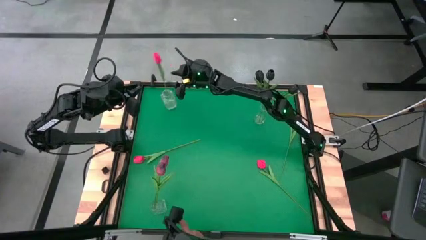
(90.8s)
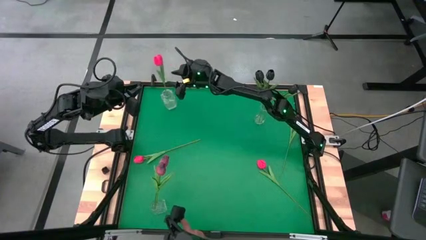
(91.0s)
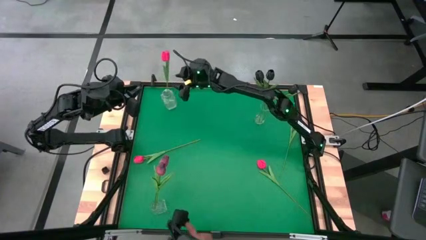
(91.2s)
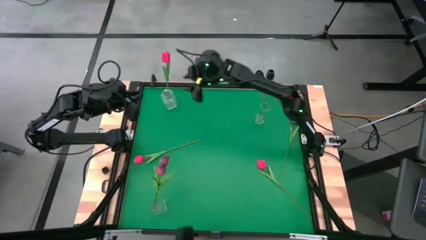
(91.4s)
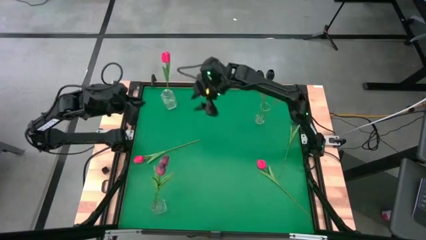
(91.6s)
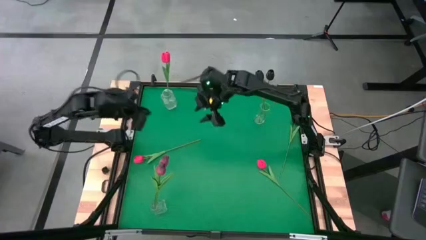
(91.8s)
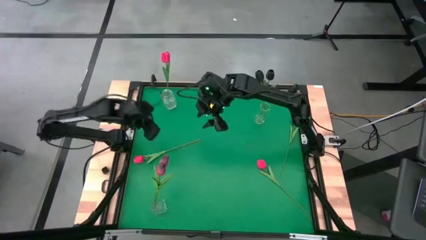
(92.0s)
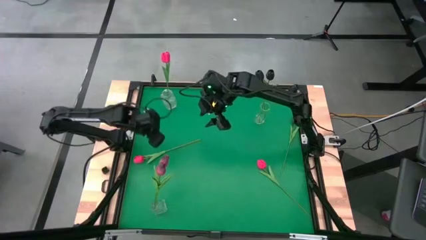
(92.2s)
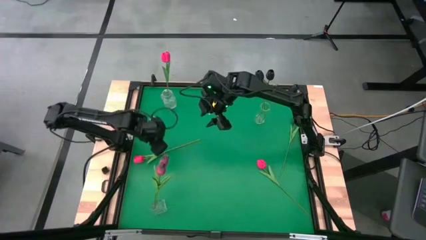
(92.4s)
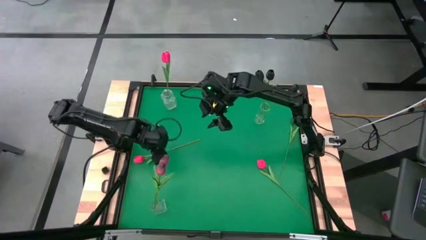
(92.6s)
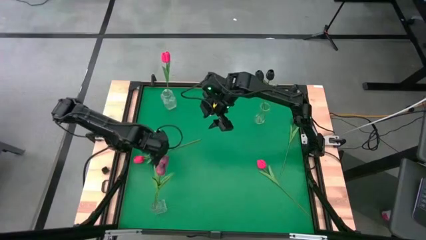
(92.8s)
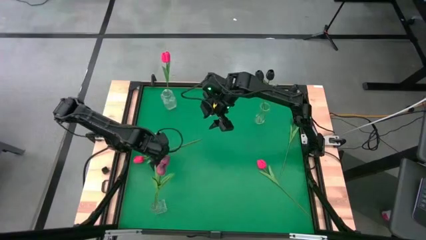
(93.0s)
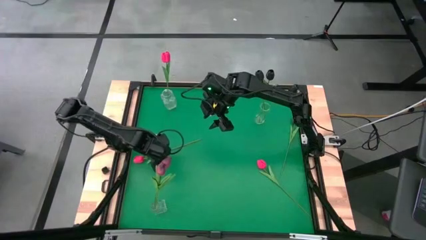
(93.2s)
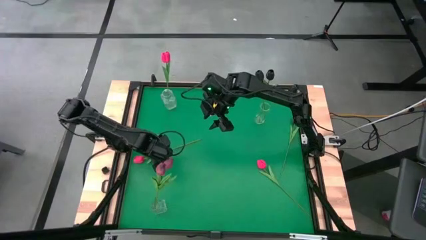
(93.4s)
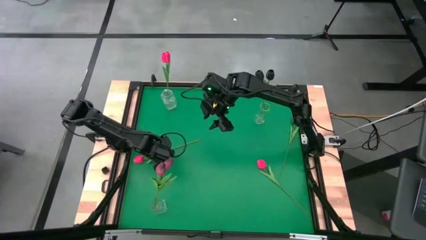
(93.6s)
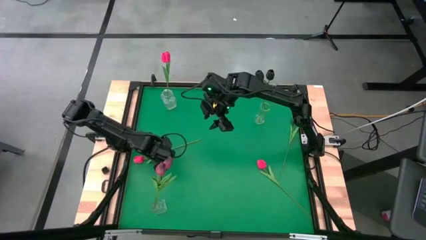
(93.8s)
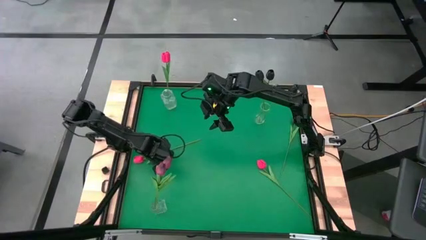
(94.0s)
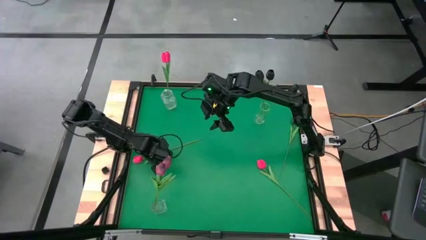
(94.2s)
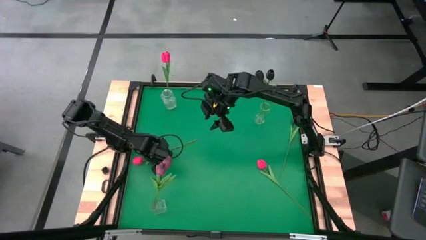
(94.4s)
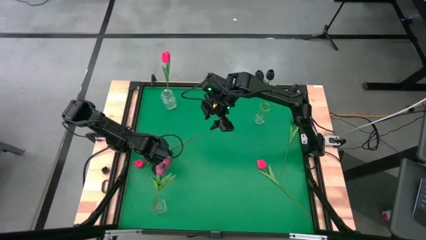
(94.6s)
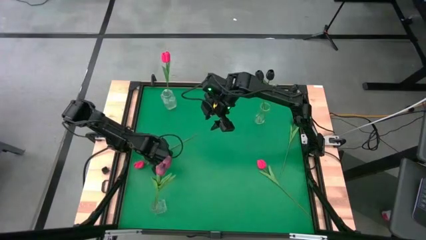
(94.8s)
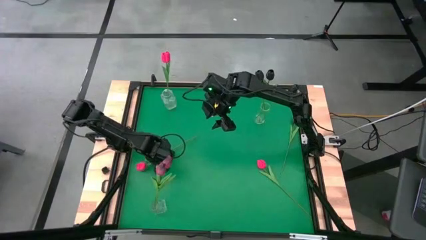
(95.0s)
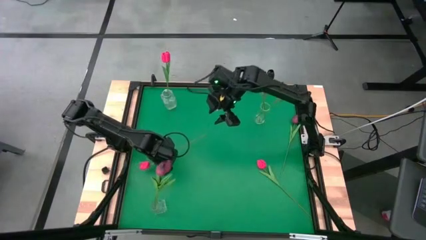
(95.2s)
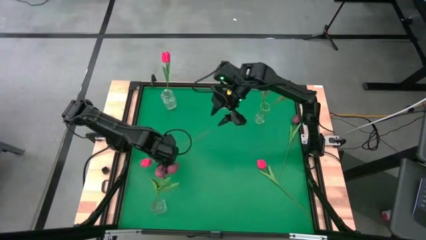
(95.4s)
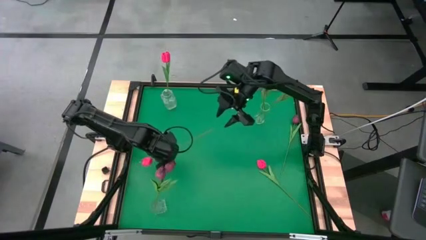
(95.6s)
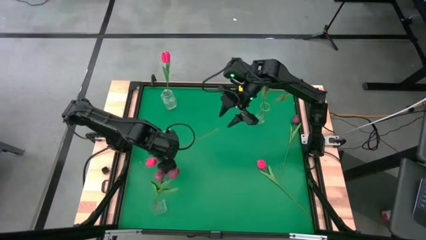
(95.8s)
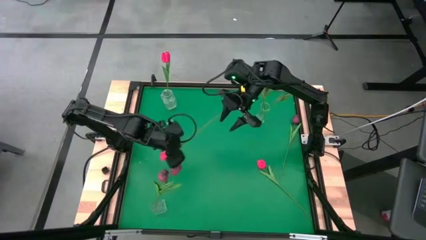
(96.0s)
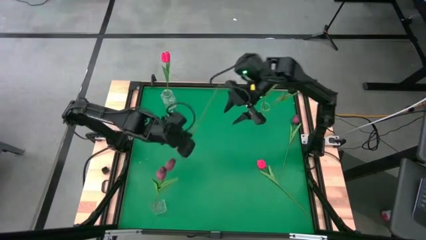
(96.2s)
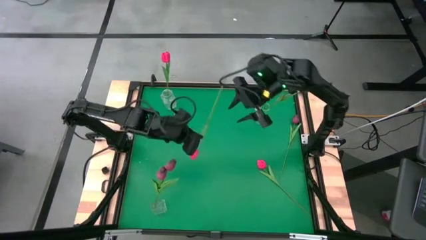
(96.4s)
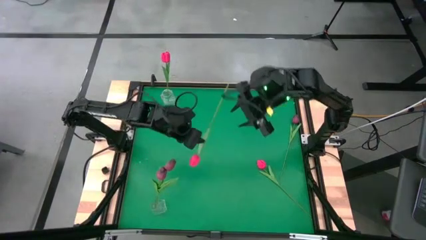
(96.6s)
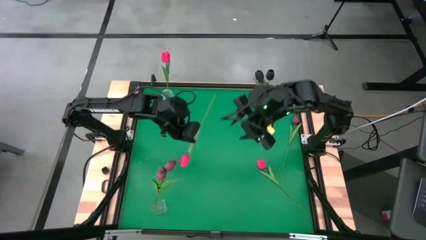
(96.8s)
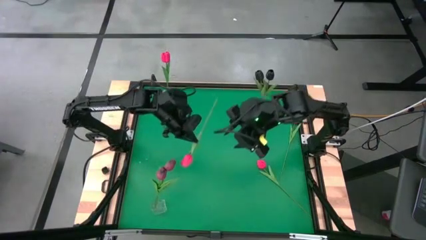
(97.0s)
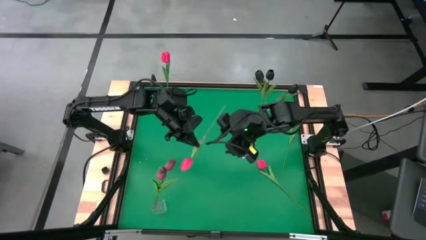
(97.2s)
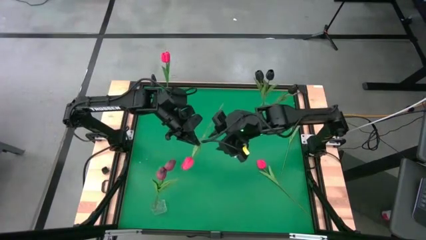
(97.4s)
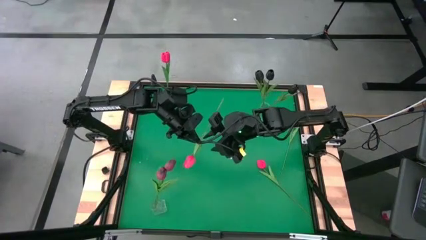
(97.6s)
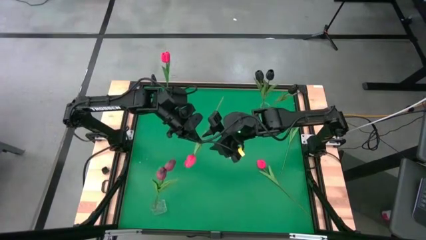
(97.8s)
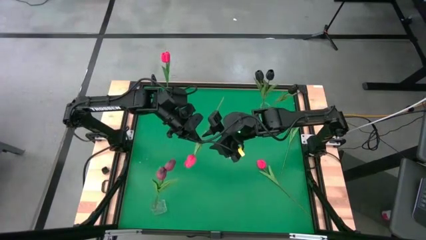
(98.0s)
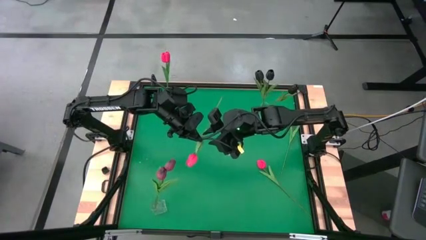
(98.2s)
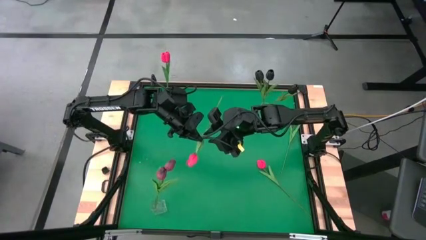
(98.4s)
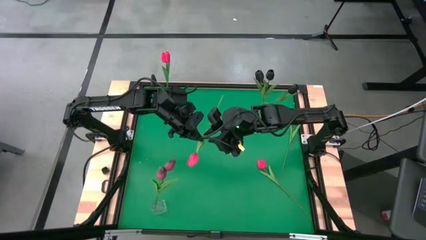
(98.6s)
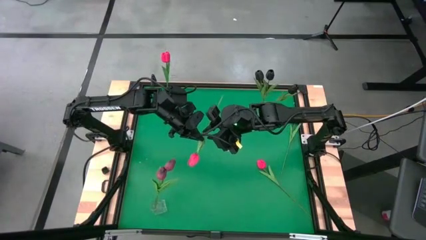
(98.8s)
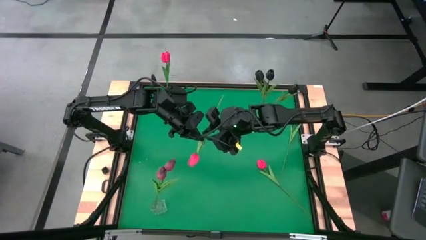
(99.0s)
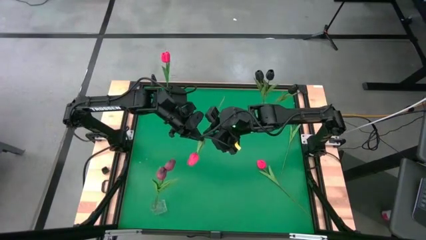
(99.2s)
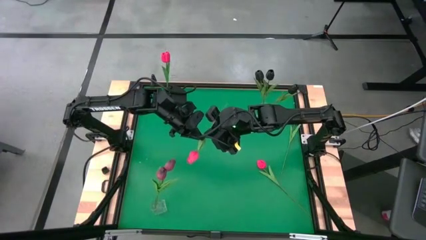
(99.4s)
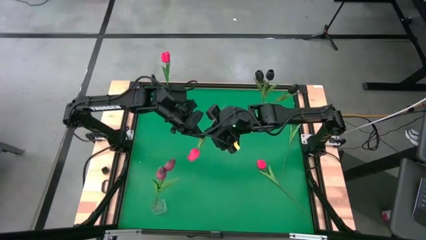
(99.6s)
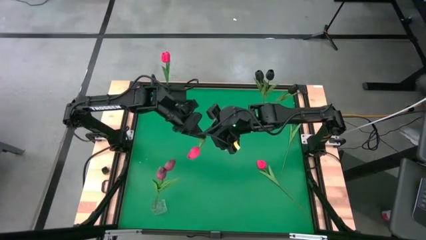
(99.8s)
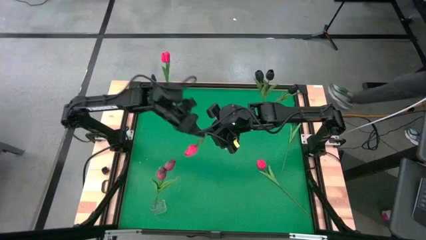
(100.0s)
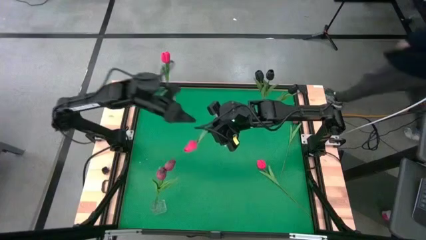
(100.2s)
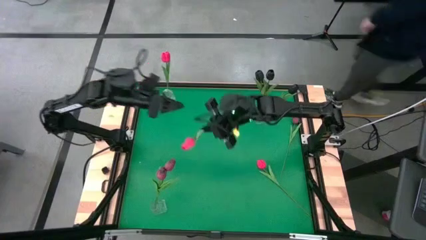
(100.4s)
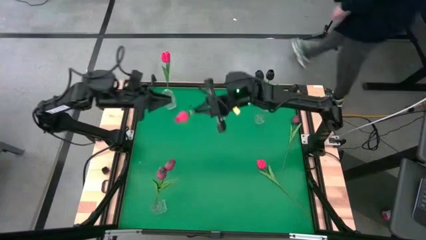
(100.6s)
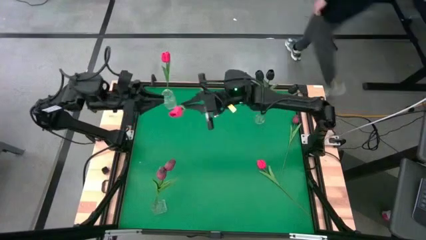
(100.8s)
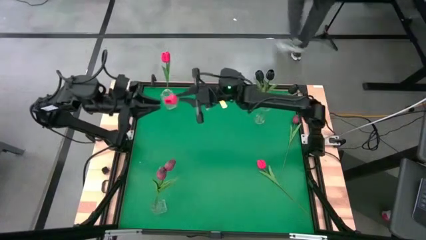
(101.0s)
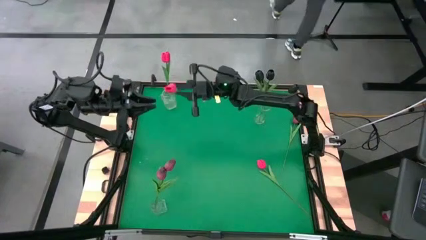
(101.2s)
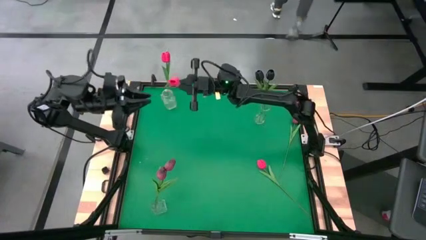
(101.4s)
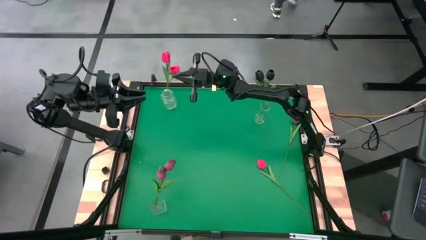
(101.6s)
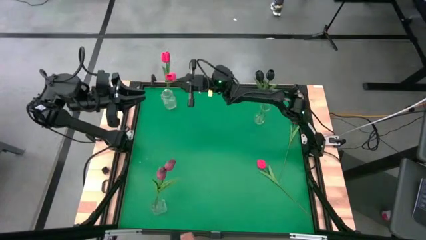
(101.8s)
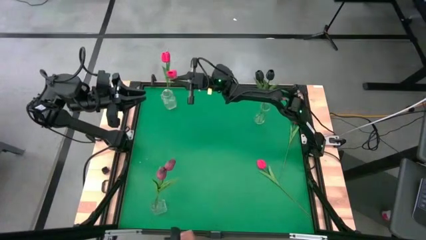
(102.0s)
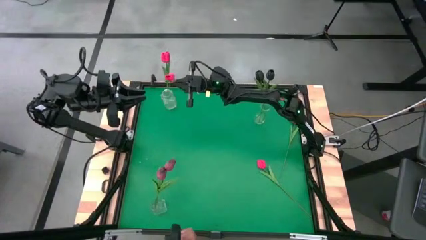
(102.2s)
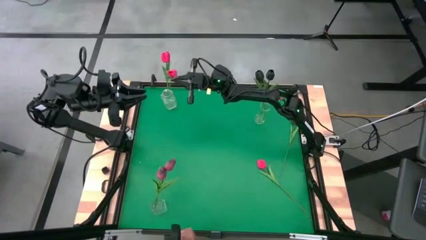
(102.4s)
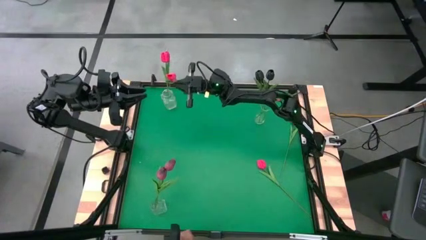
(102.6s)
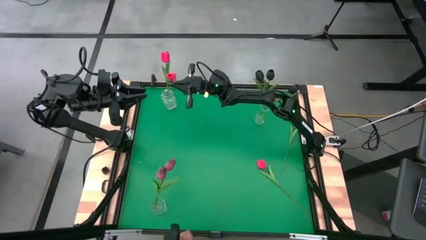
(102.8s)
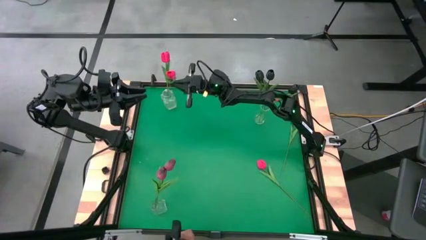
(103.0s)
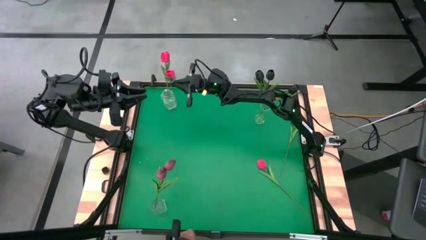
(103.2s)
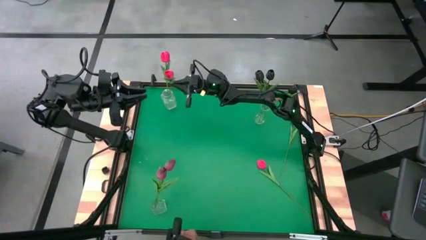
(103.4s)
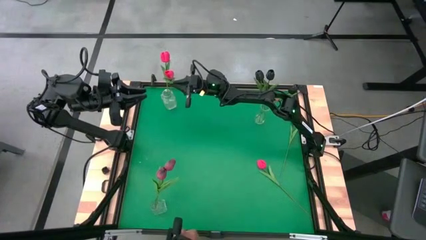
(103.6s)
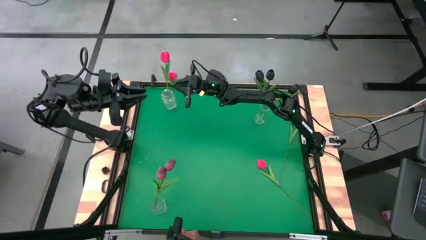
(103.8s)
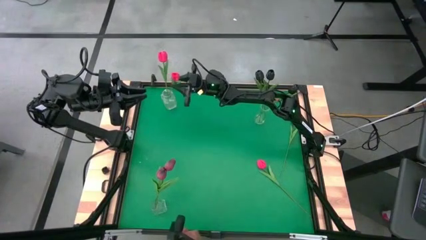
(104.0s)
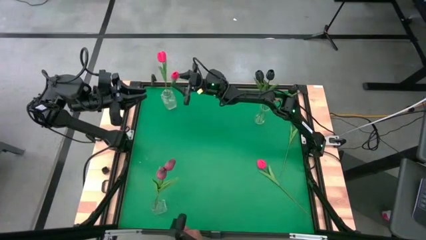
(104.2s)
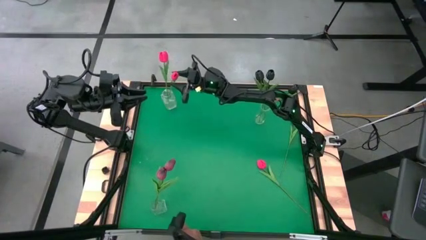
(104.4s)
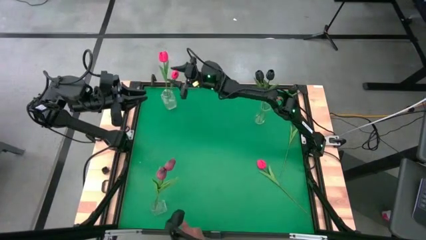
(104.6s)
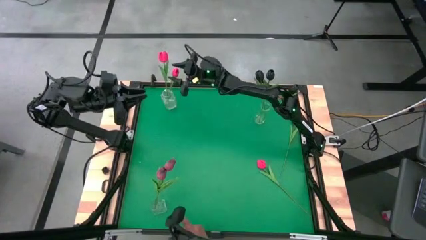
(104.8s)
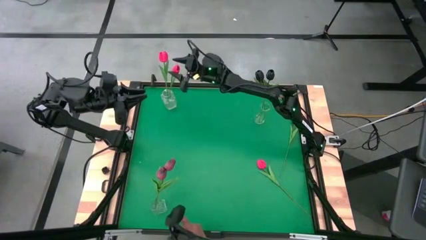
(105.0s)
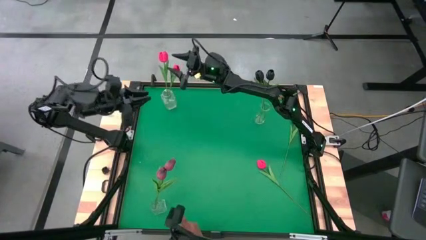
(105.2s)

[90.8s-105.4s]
Task: Sort flowers into vase by color
Put the left pink flower into the top left transparent vase
